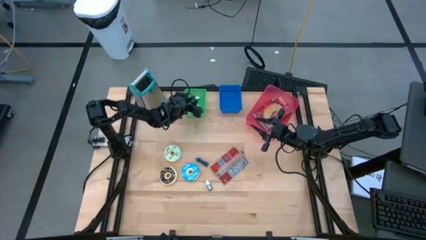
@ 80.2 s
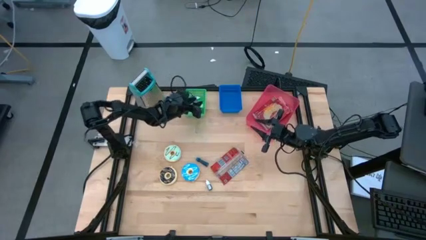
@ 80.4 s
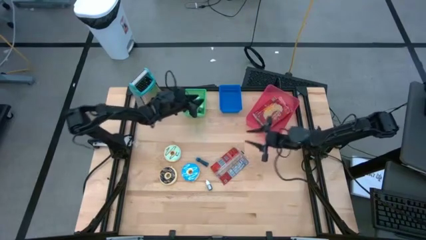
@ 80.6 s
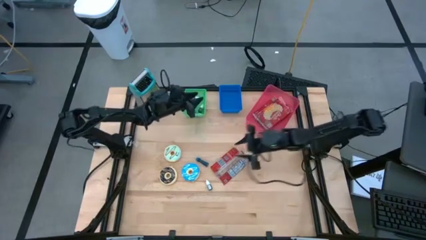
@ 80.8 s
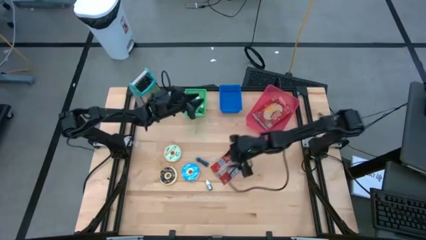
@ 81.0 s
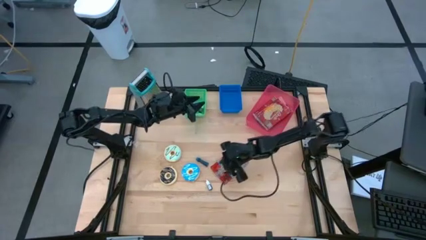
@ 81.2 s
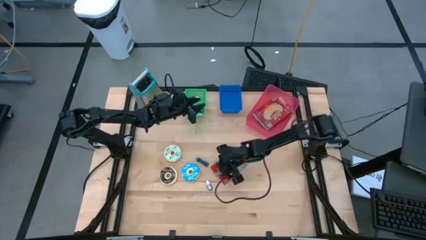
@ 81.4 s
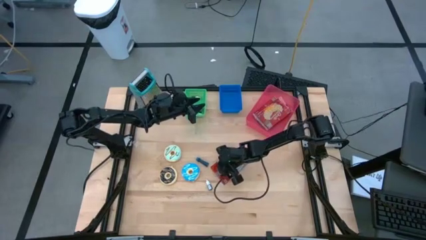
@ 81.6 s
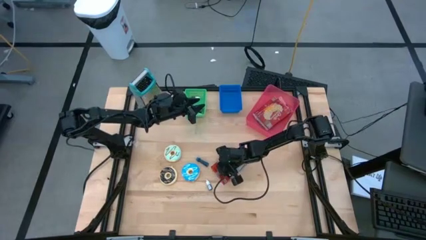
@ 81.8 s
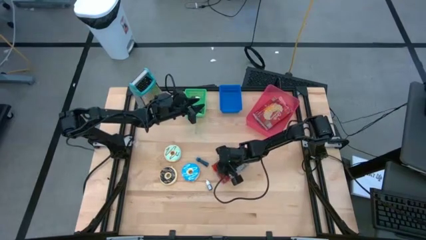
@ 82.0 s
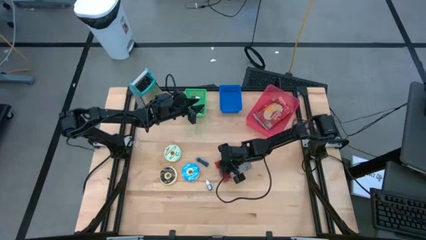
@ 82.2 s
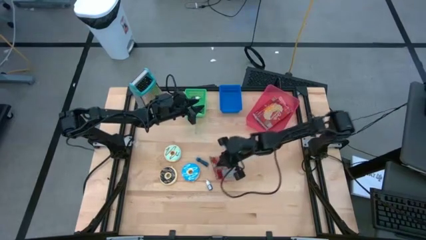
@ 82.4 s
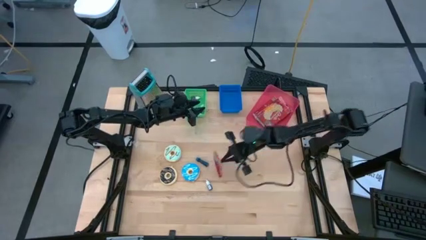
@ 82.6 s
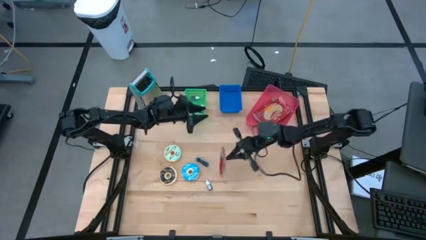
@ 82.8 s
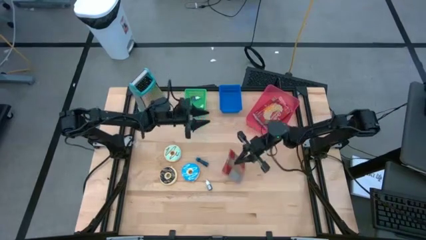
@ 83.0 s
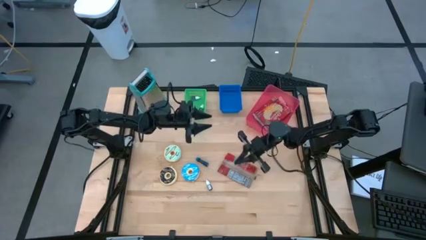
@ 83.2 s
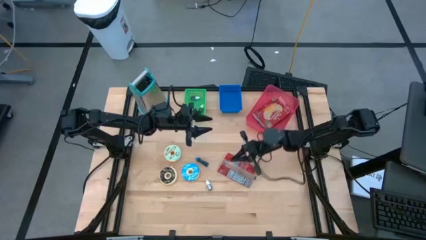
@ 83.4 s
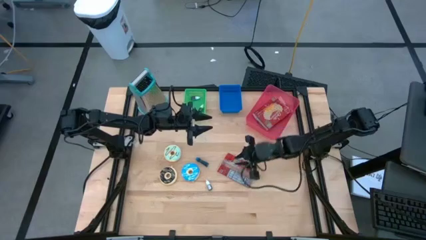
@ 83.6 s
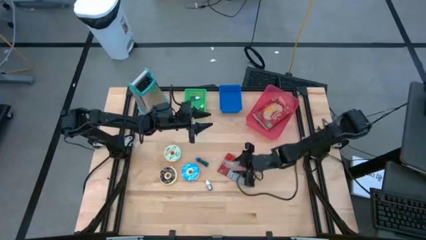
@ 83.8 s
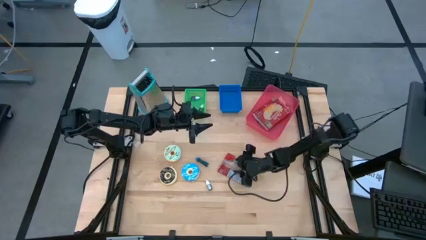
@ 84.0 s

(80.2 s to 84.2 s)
Stack the bottom red popcorn bag on top of the red popcorn bag in the pink bin

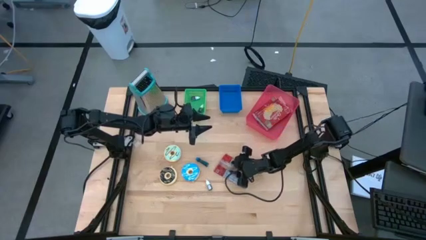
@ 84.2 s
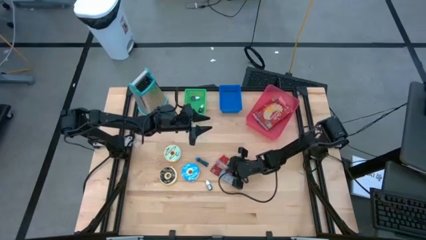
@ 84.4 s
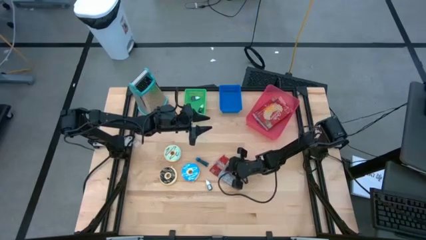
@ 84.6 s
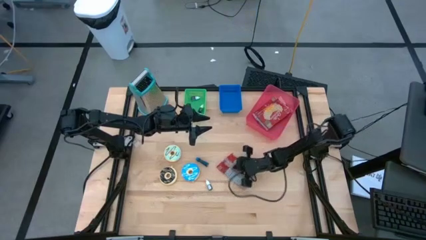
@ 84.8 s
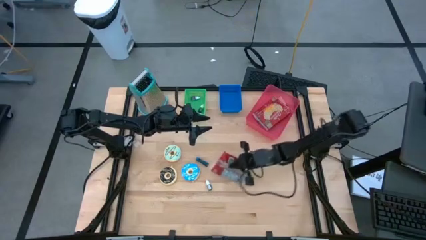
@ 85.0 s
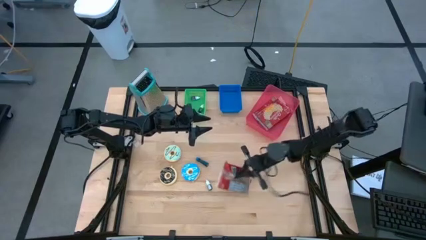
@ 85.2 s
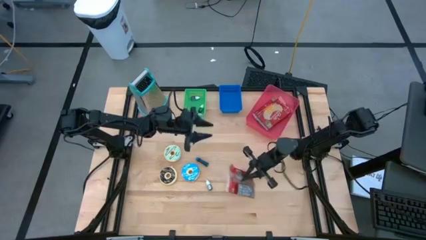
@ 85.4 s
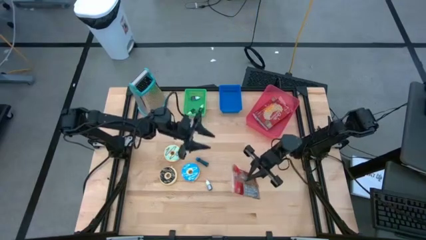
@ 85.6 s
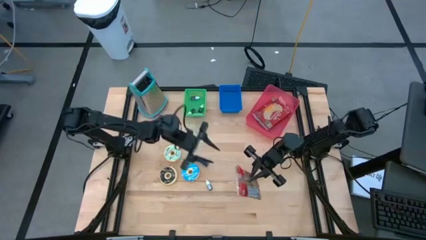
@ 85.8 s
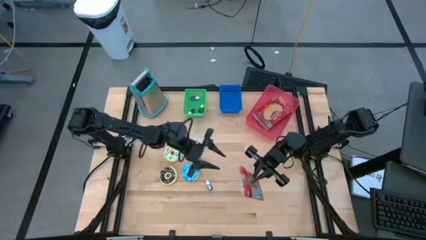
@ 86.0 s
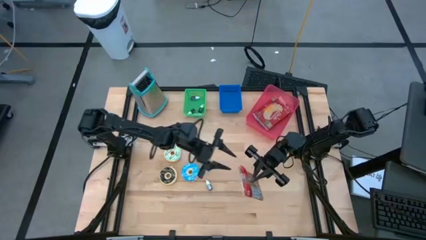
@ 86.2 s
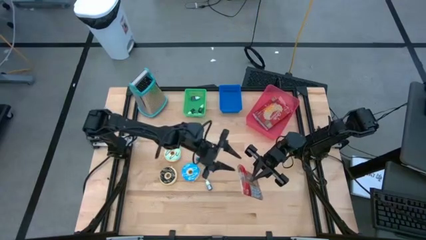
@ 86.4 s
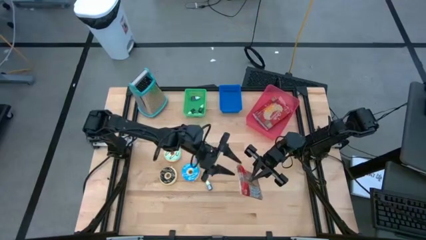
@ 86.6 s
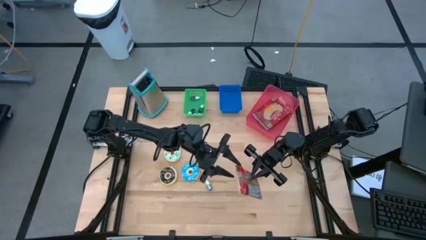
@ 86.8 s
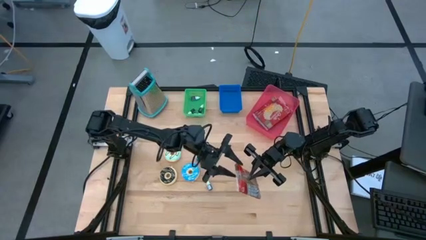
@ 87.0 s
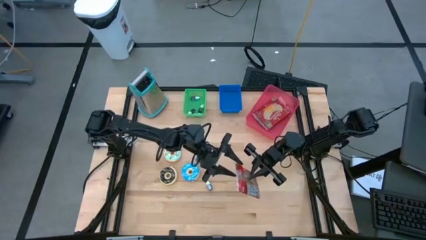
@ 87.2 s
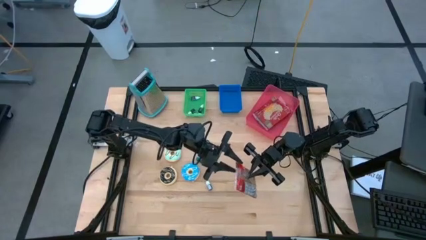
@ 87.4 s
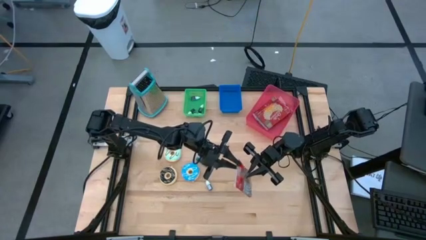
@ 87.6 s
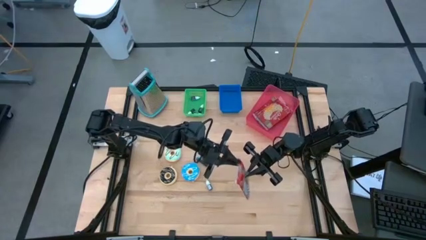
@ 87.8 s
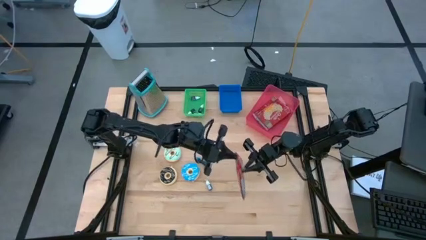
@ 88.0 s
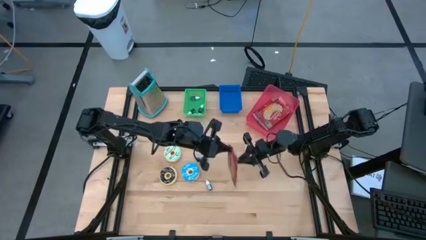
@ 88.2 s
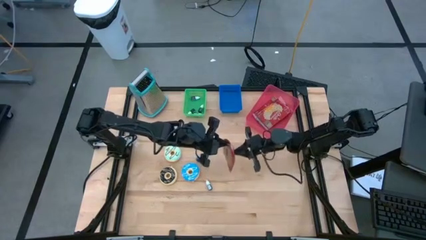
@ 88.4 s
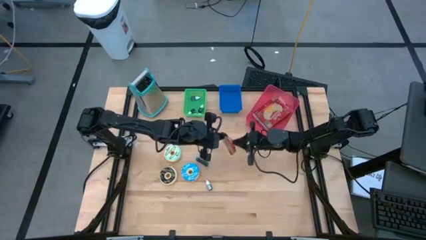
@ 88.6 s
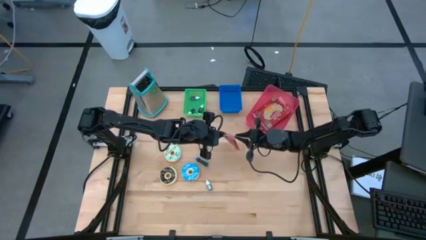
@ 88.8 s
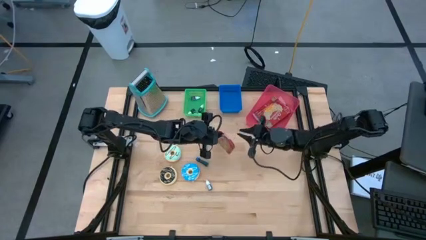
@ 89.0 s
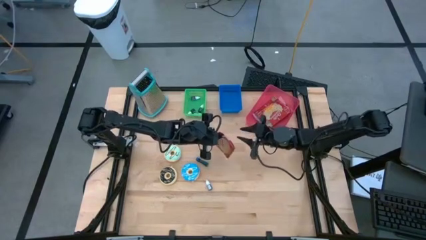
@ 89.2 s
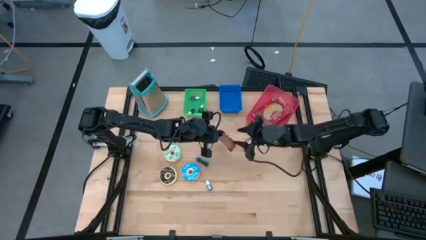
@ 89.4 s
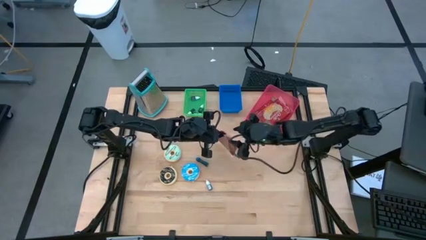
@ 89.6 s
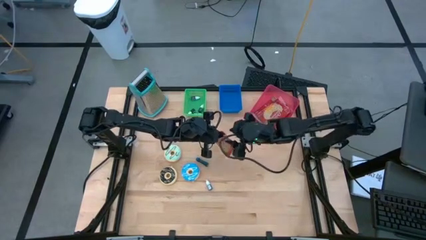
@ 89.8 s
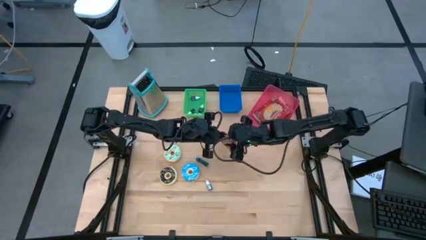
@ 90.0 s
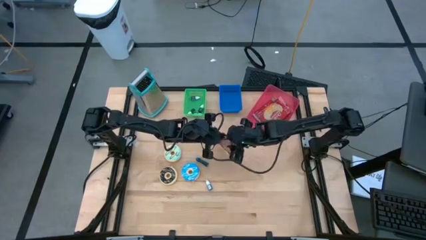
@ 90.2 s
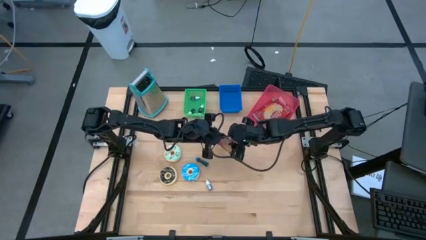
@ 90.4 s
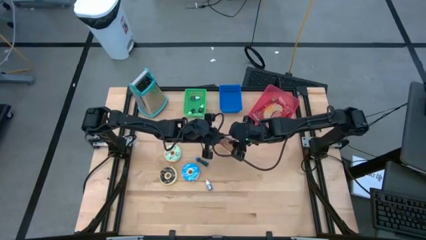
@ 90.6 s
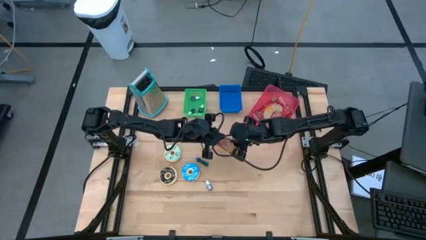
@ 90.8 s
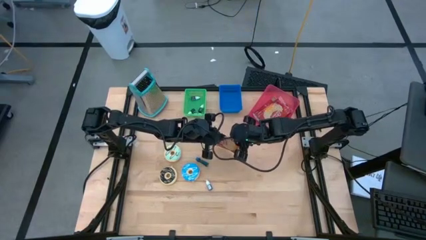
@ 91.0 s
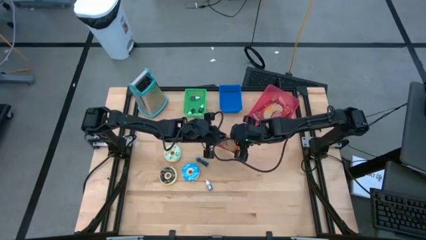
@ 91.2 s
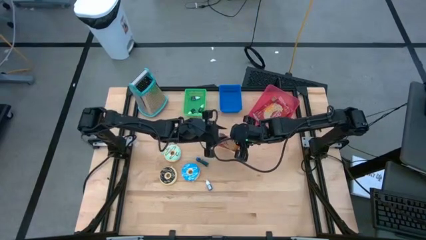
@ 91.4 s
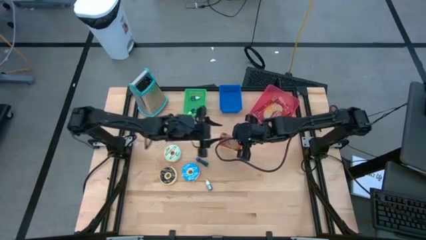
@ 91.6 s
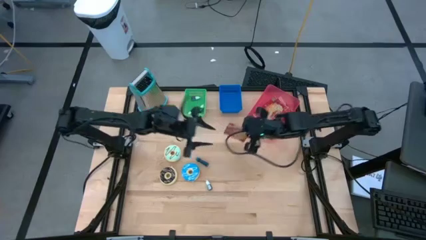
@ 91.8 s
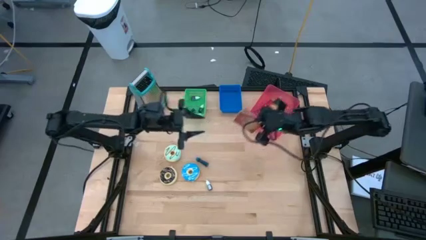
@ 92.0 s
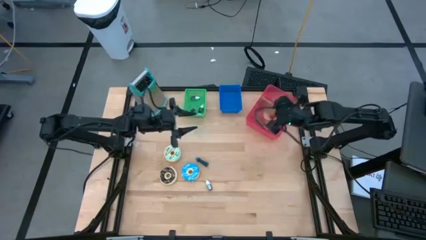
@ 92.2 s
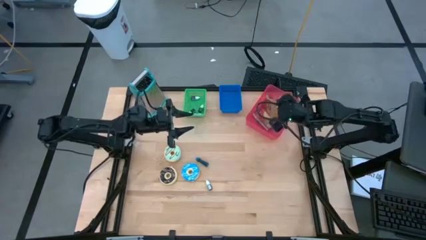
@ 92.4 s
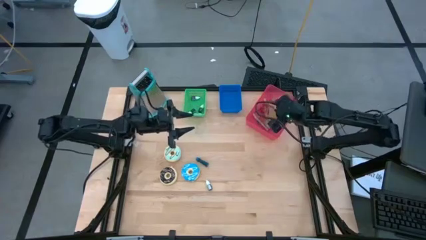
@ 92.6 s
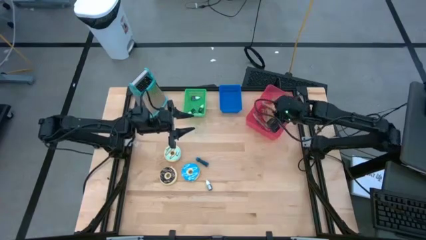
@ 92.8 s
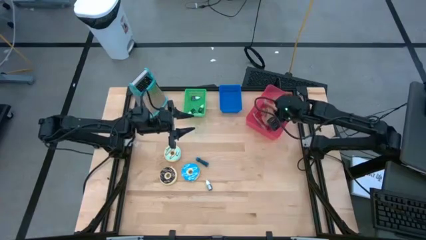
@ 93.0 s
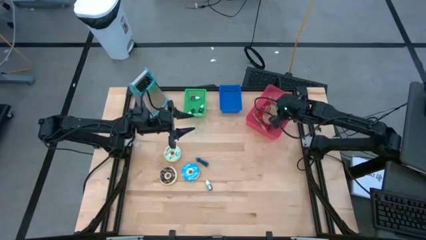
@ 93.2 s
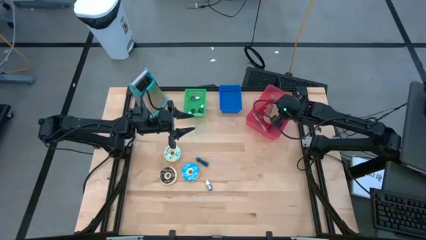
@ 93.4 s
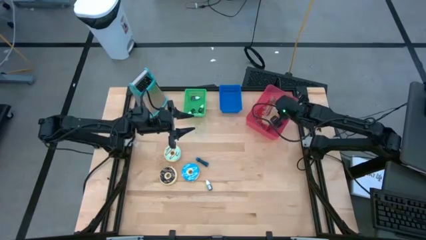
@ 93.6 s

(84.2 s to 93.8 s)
Stack the bottom red popcorn bag on top of the red popcorn bag in the pink bin
